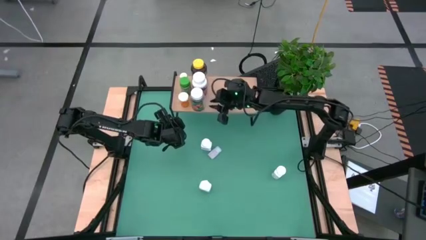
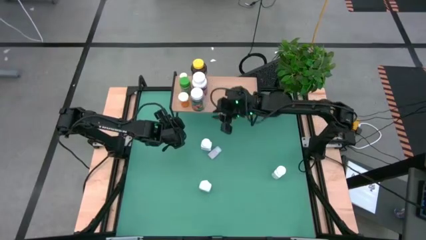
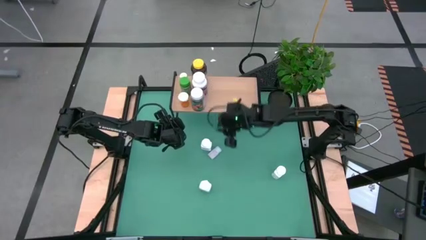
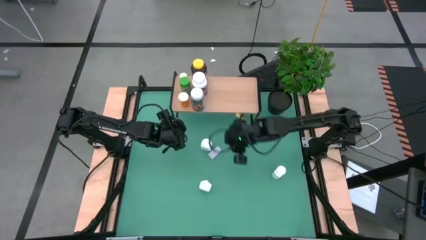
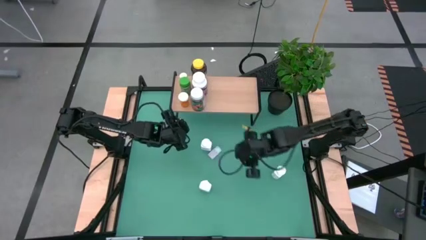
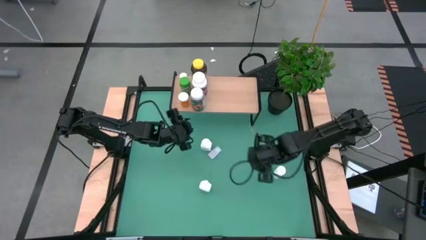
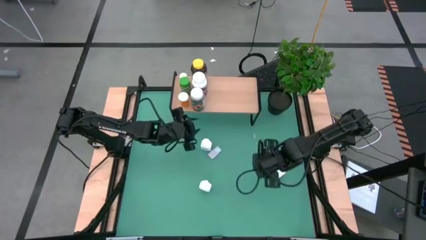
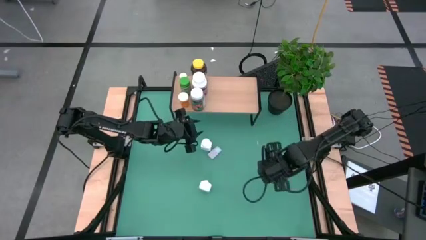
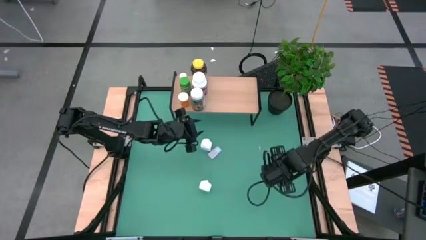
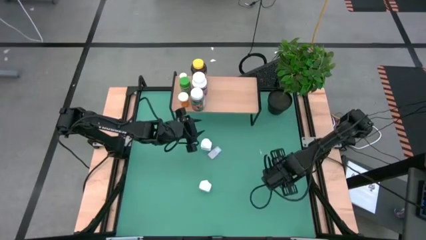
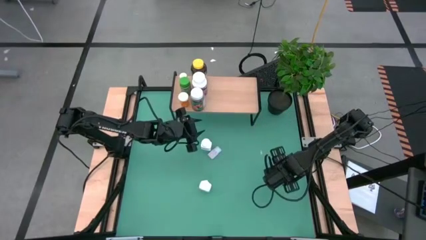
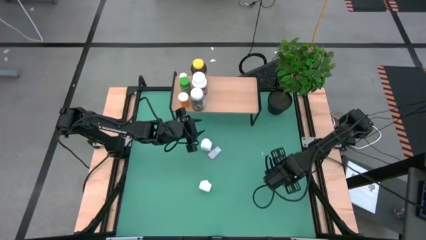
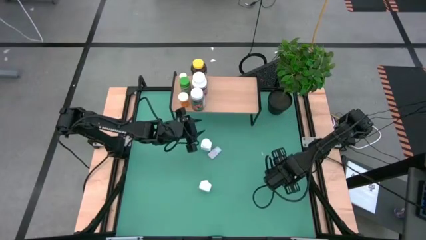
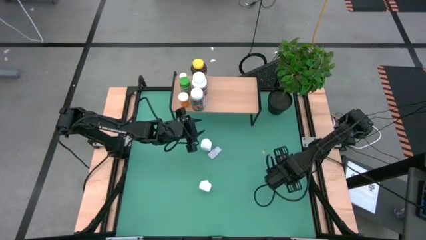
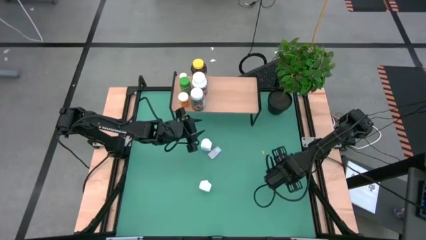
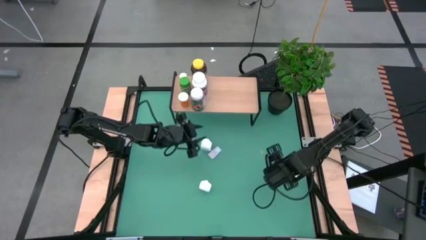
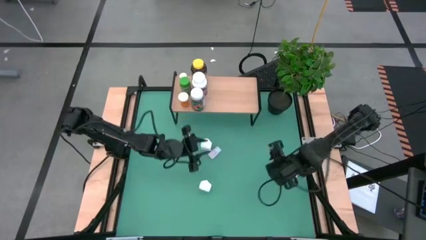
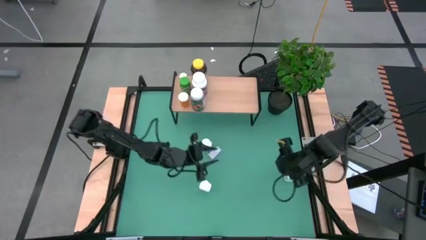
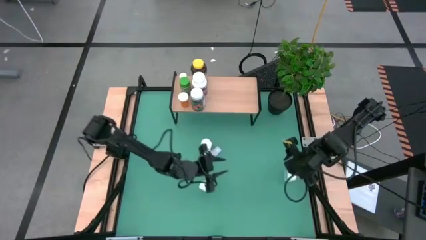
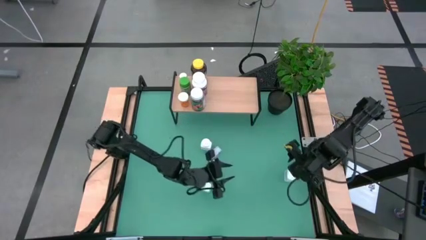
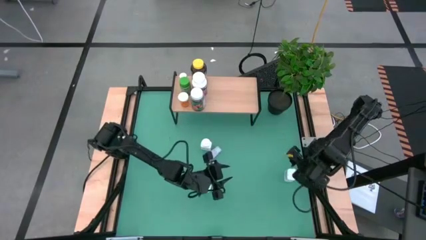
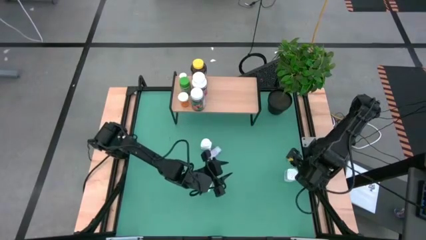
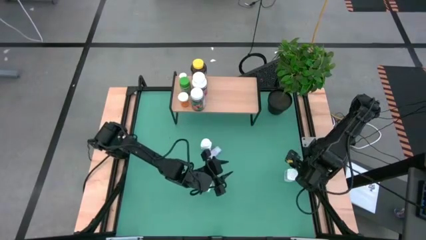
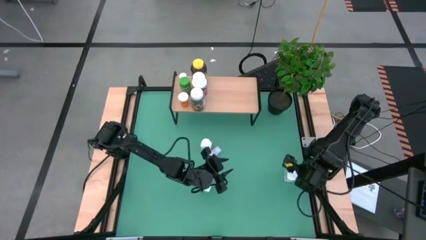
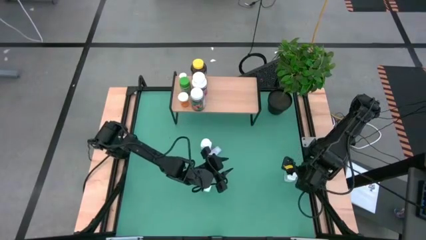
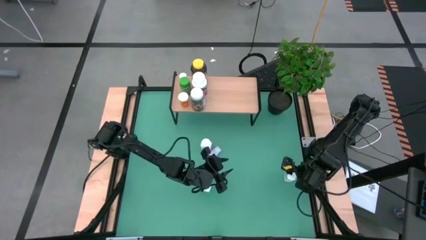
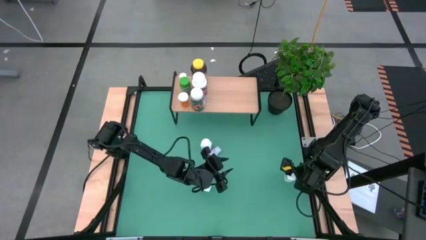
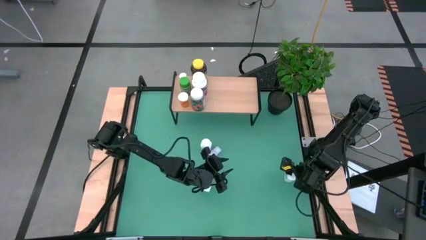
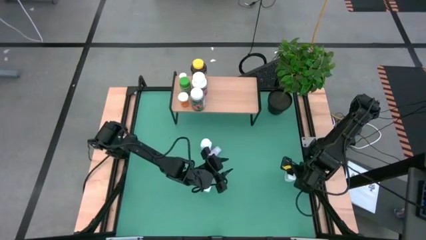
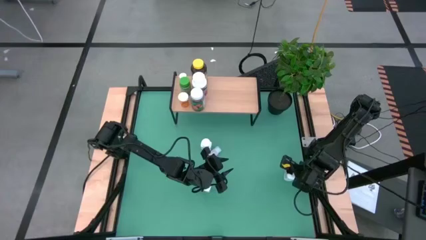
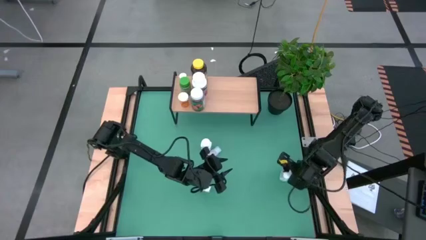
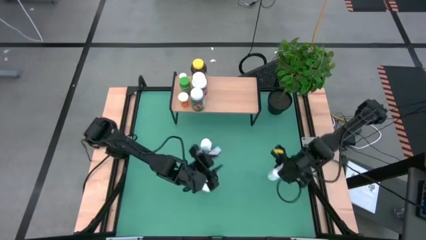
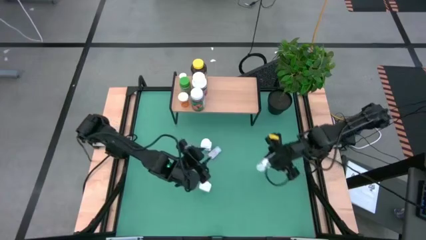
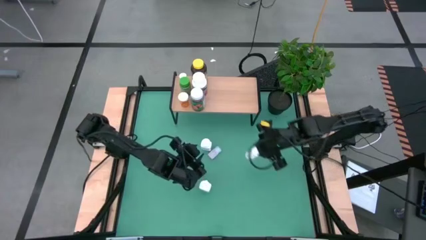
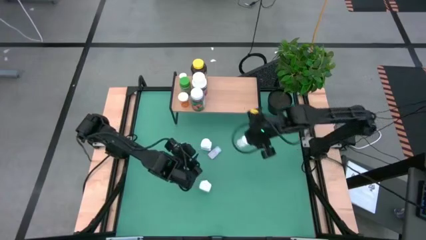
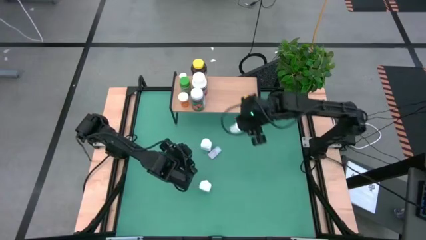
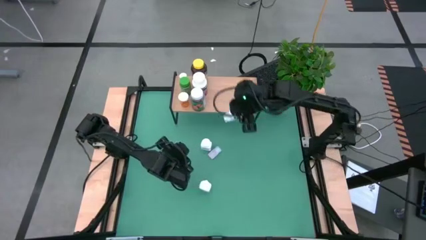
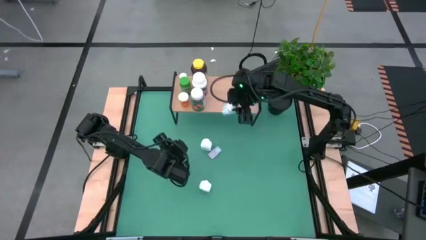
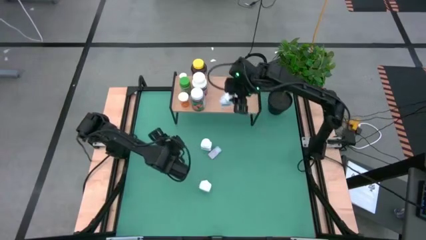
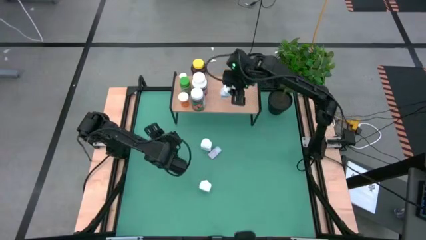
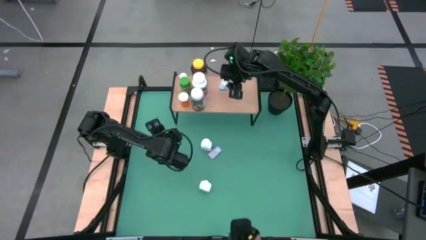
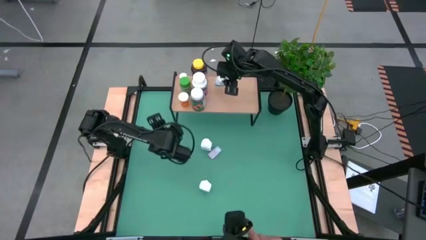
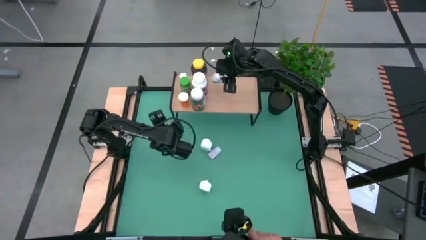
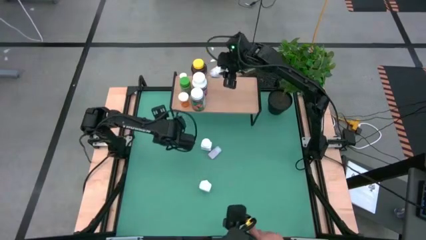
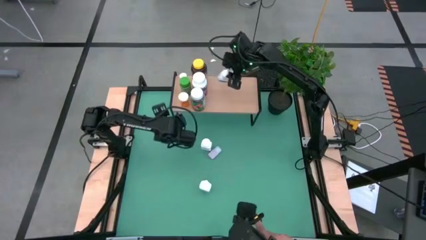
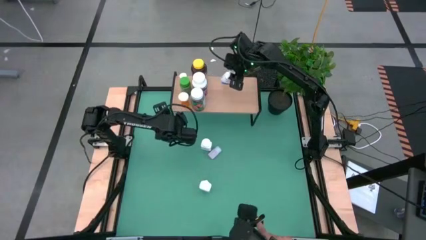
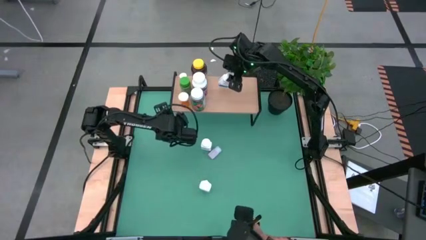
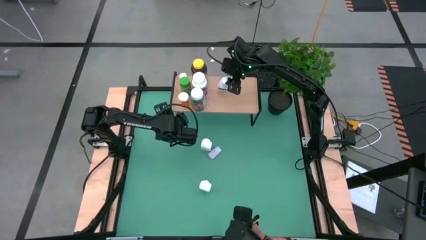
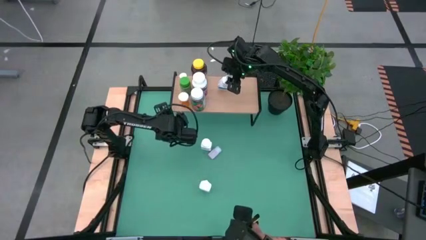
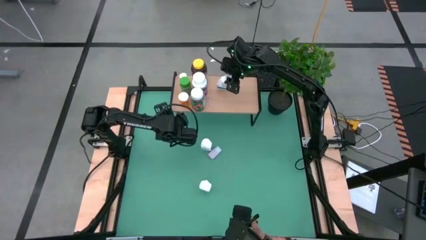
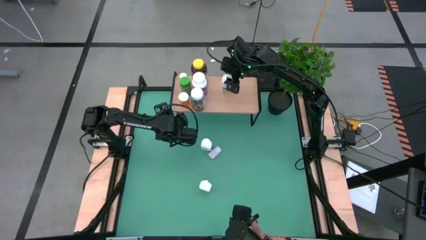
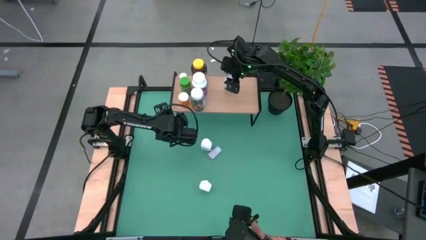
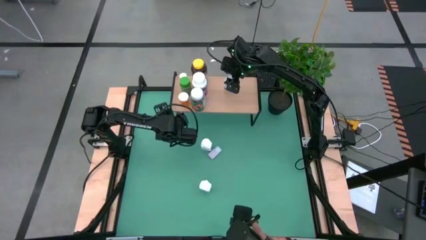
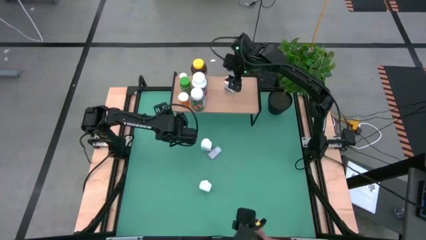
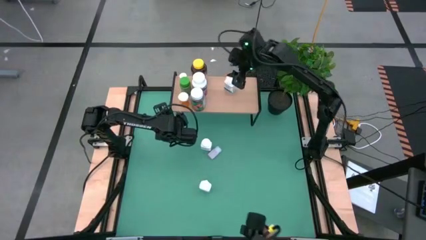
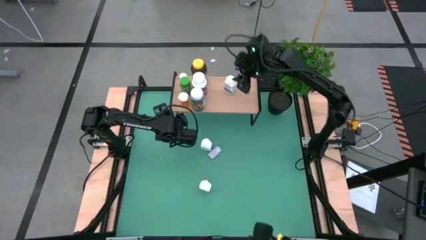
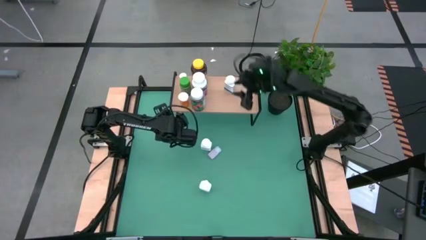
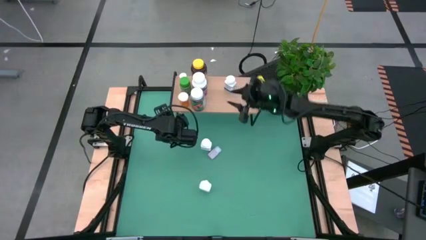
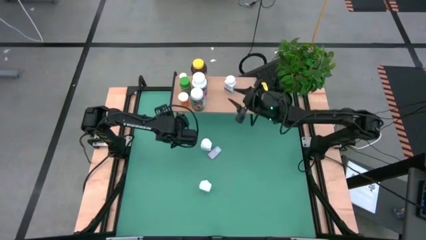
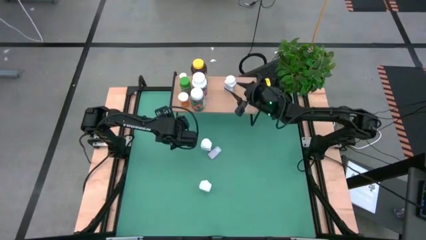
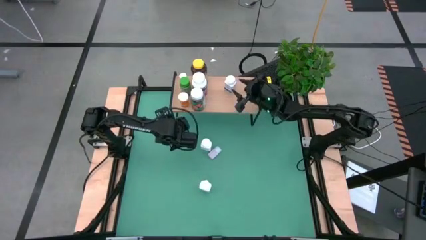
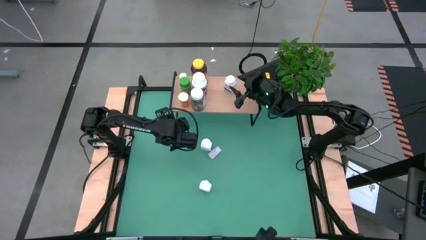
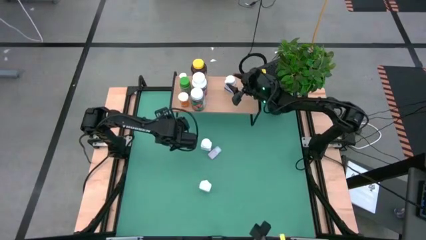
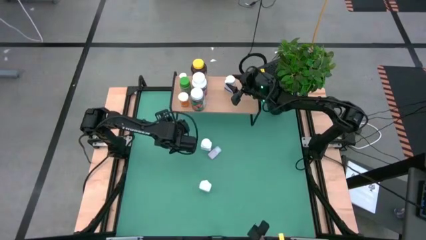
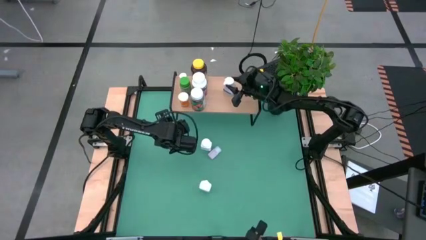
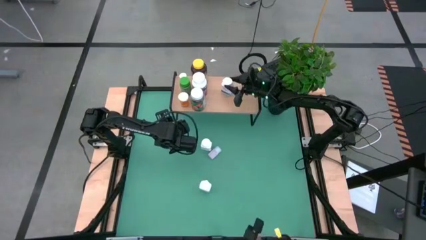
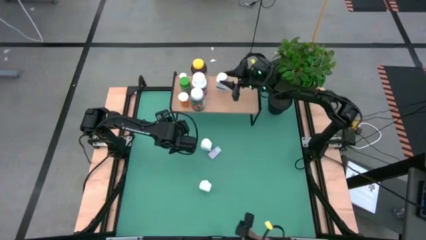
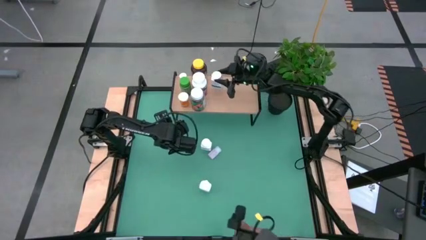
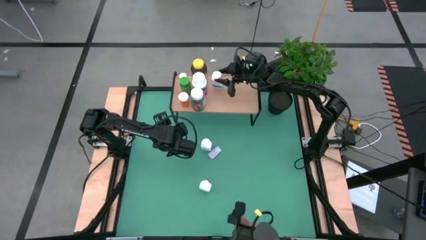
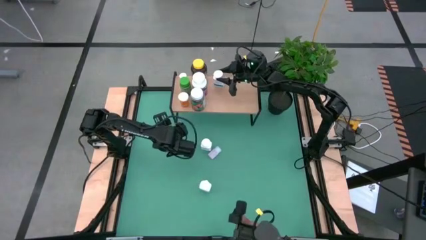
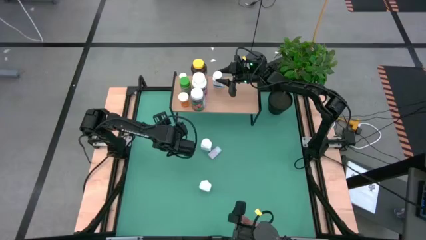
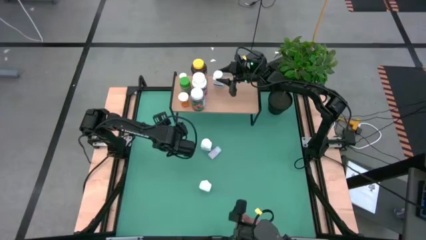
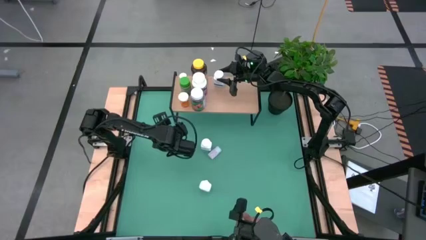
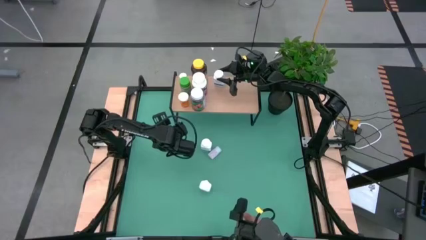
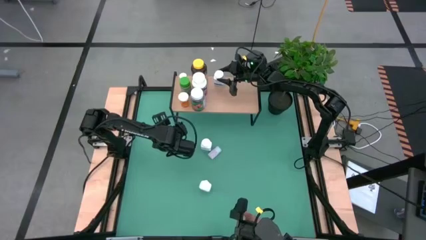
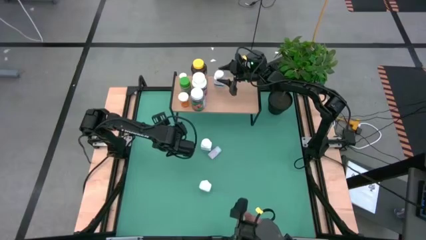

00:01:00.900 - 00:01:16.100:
Task: Pick and place medicine bottles onto shelf by color
Put the right white and blue bottle on the shelf

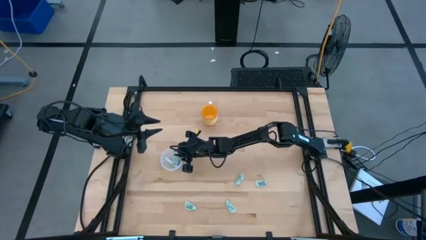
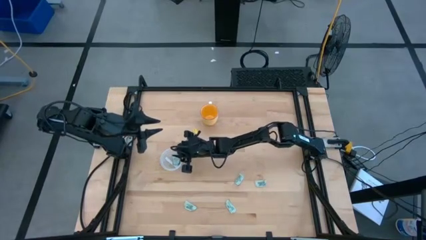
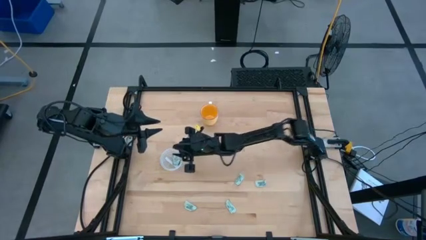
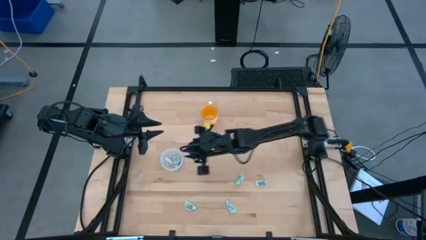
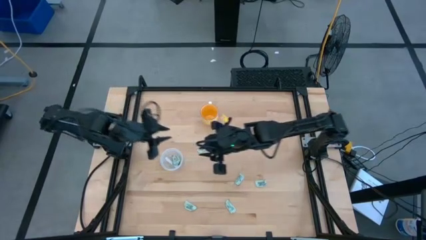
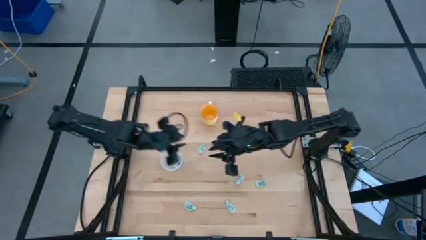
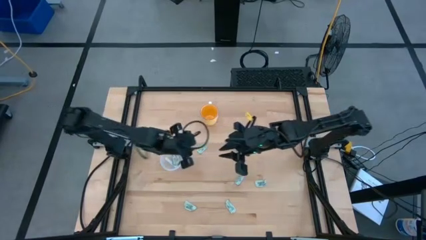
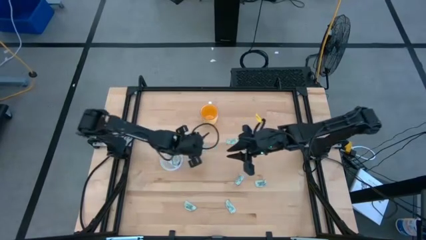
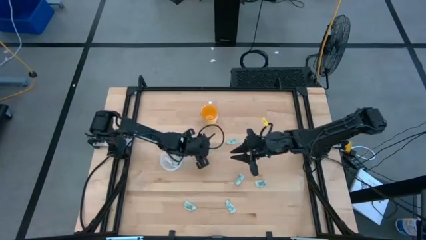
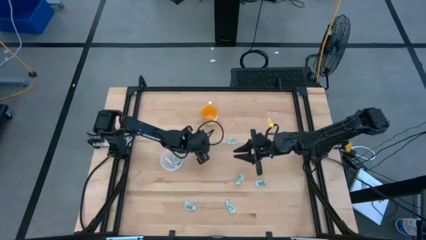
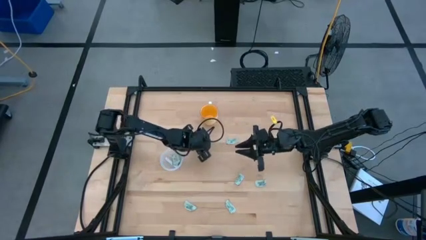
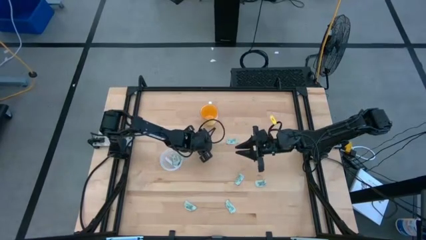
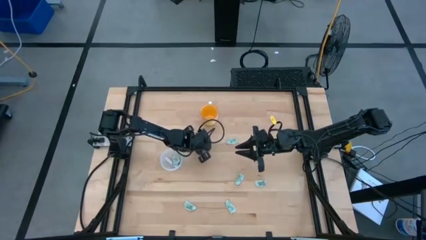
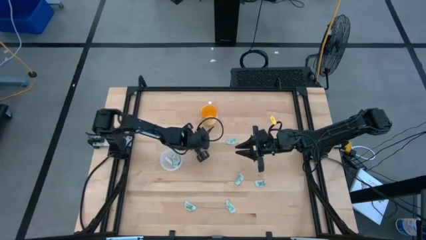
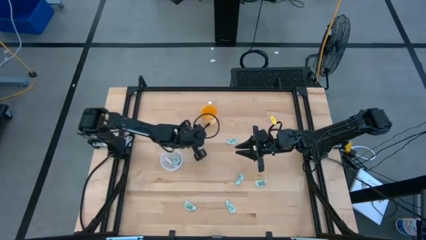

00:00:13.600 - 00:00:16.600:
Task: Pick and place Stevia / Truvia into bins
Put the stevia packet into the container
